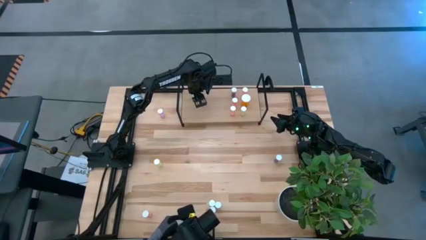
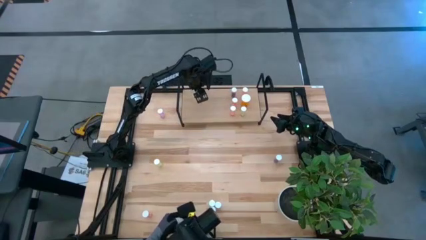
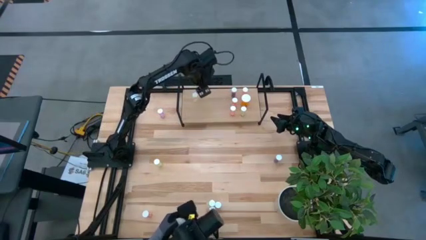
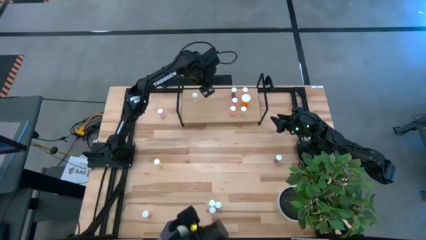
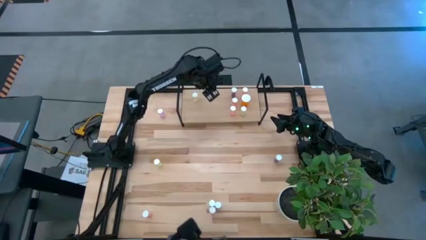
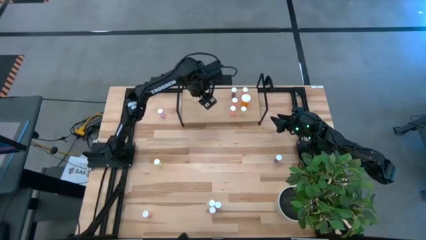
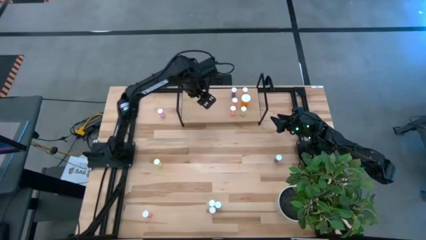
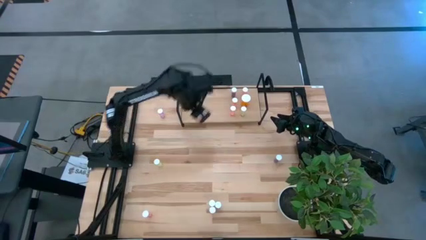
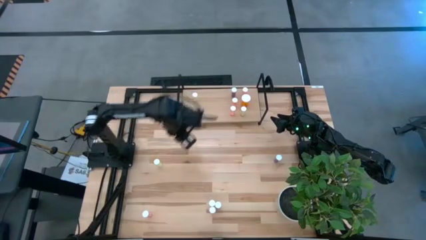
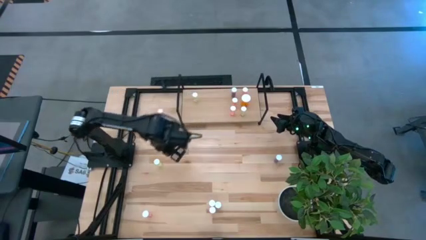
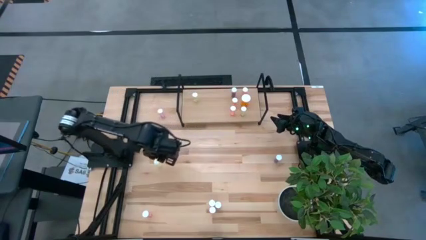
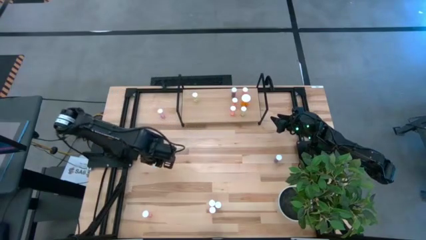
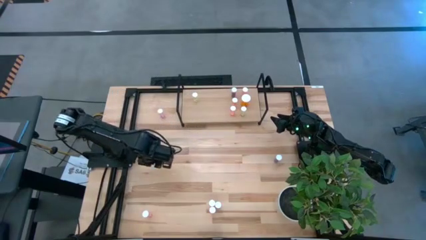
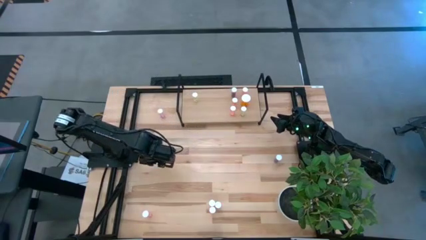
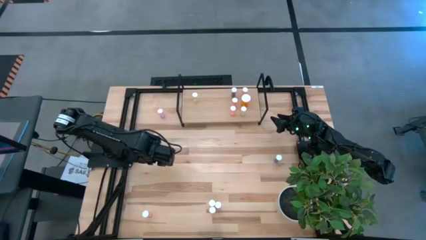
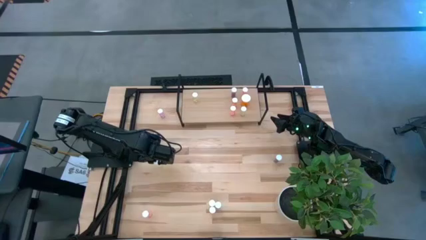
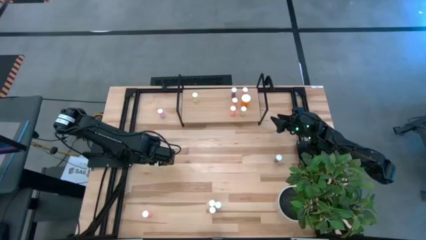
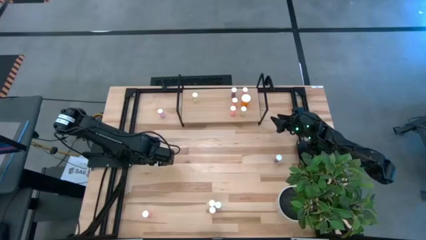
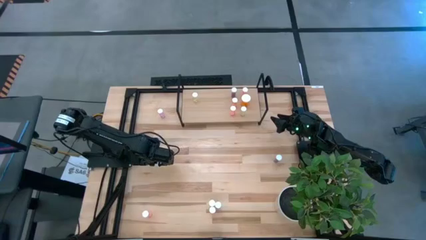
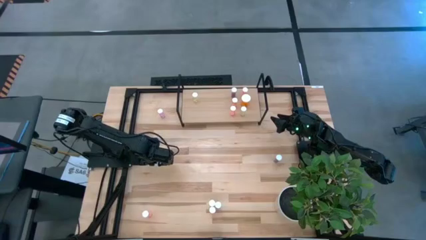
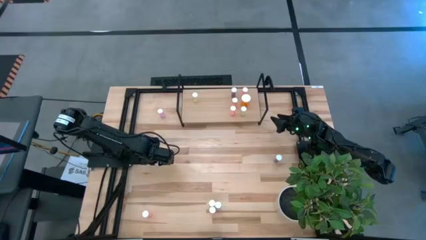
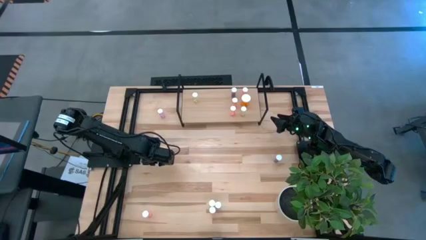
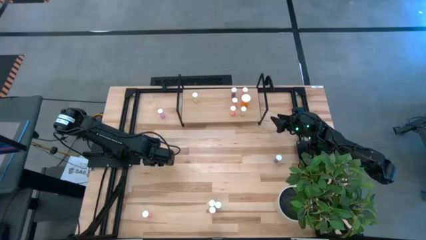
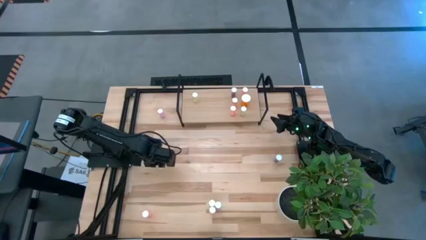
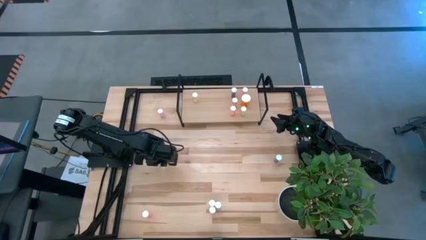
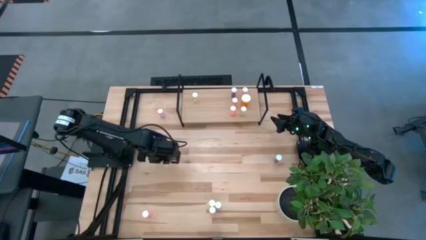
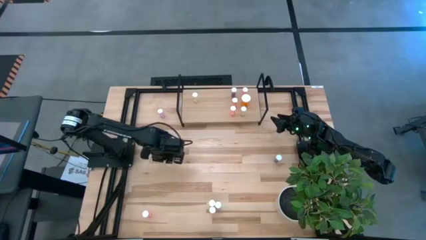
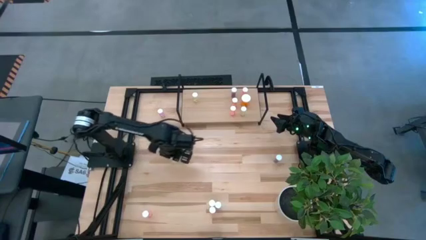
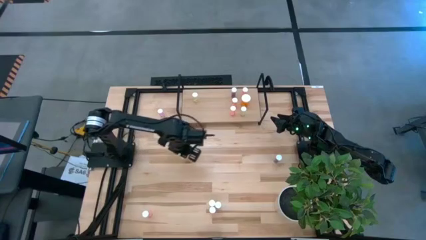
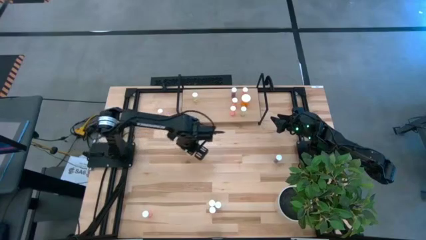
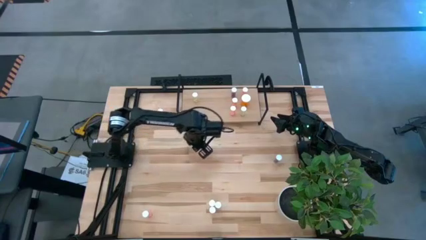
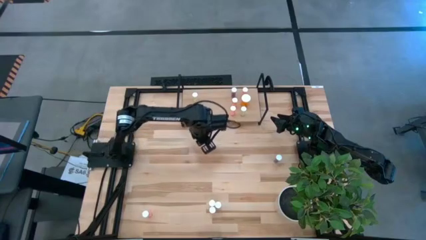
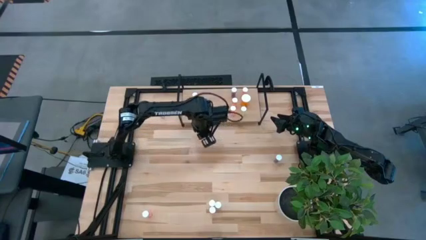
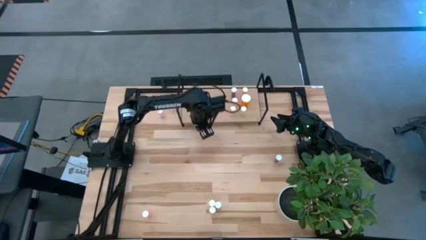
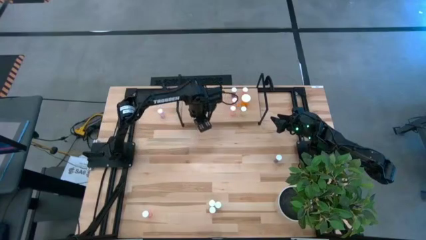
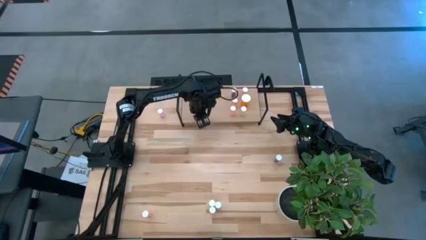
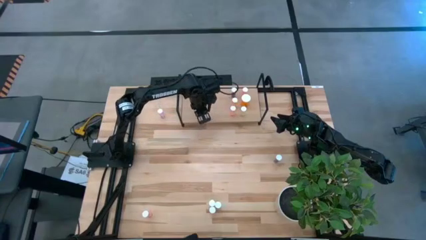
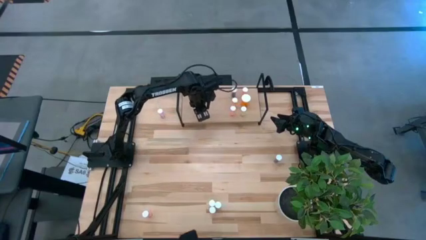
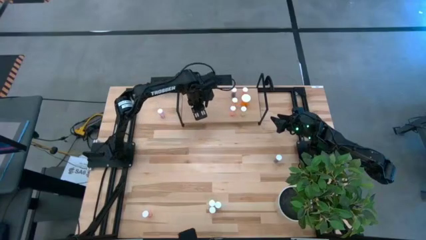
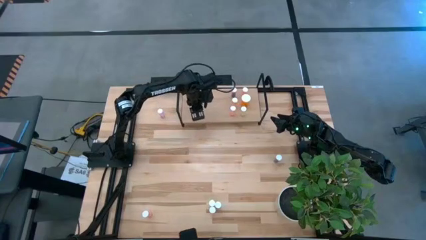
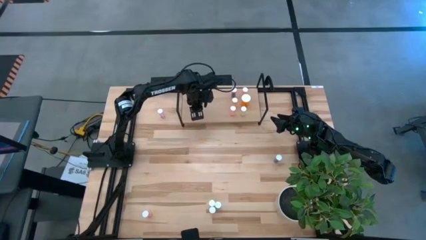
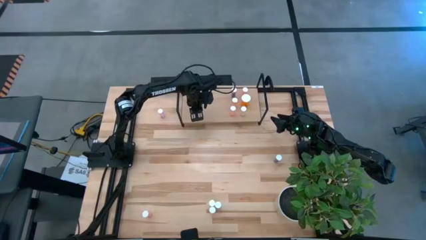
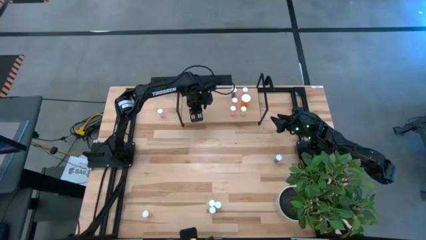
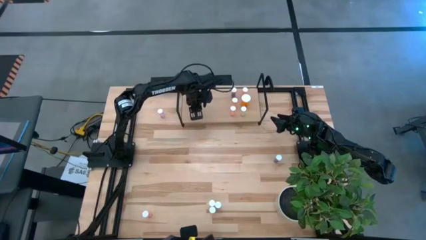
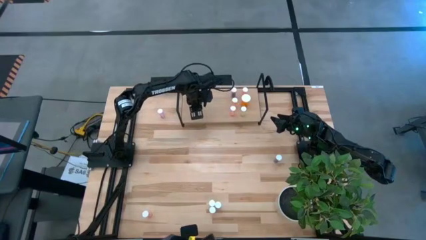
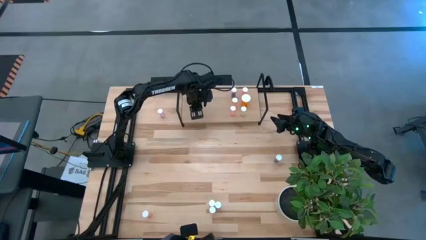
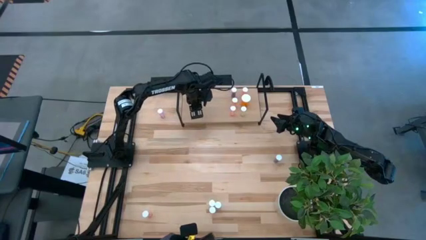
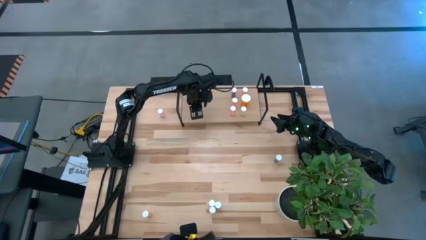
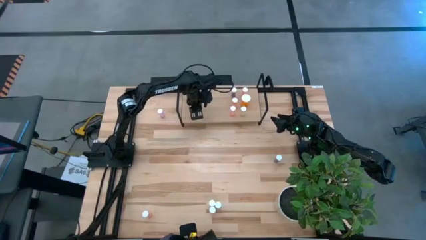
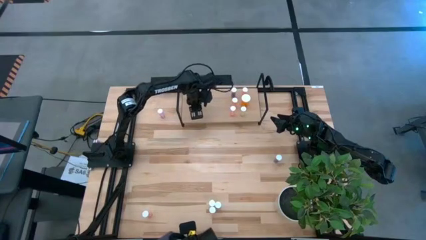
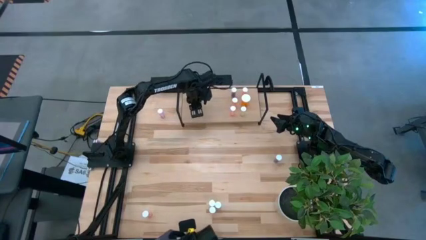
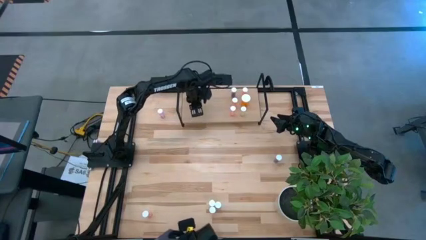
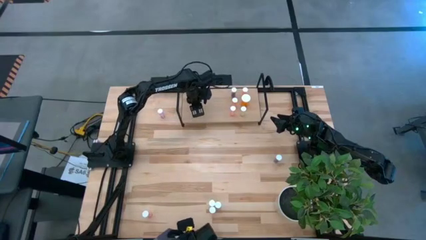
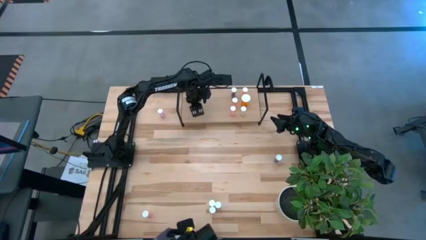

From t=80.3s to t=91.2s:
Task: Pick and place medicine bottles onto shelf by color
Put the yellow pill bottle on the shelf

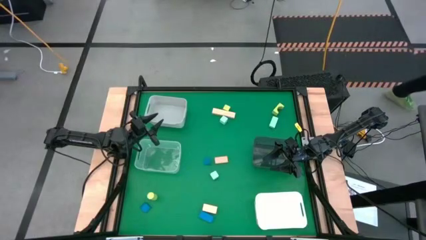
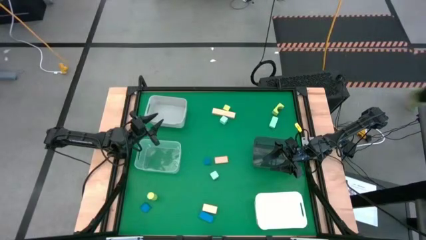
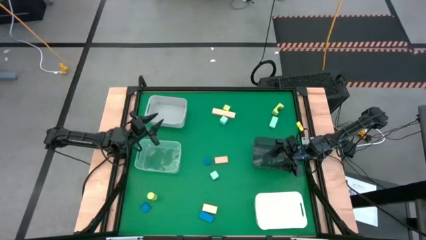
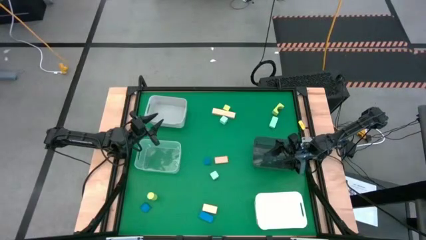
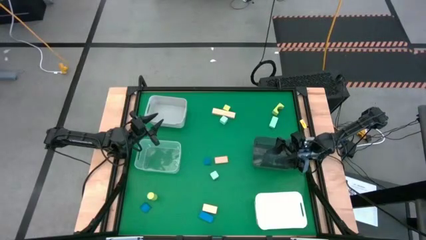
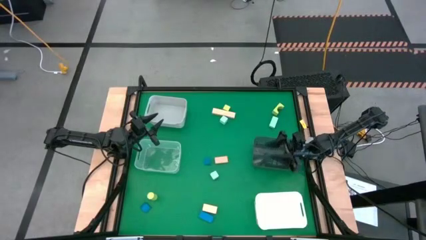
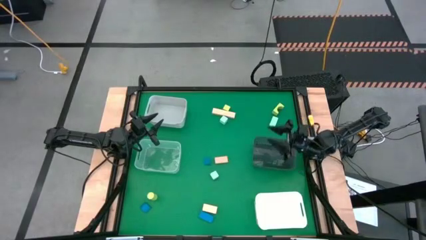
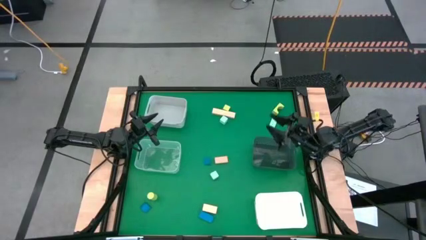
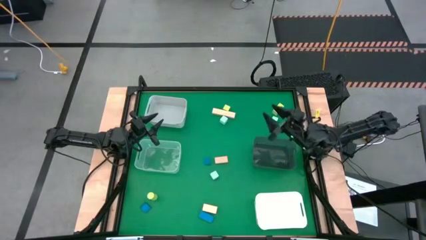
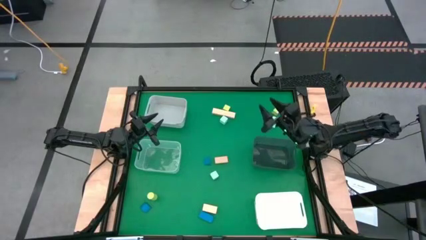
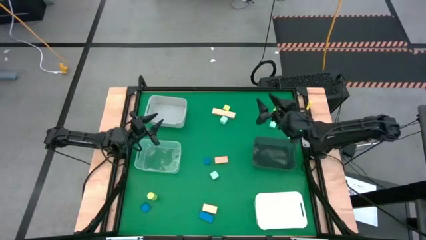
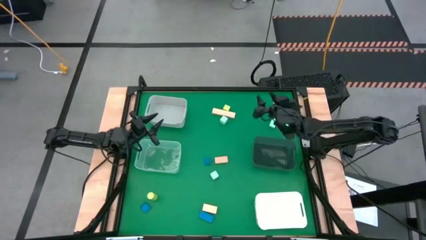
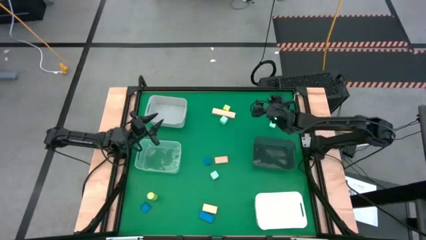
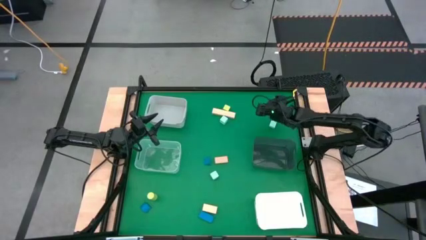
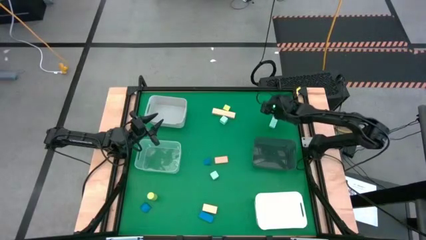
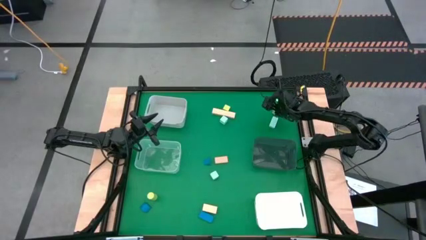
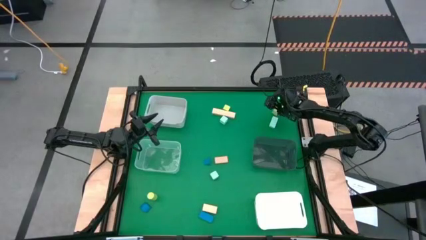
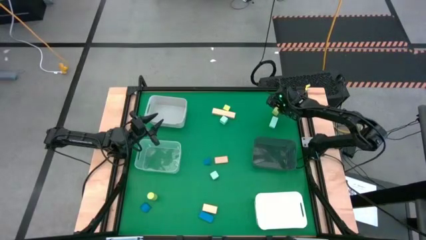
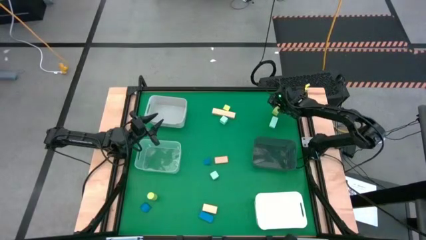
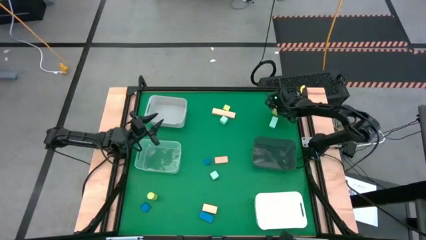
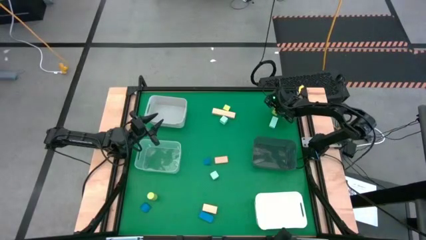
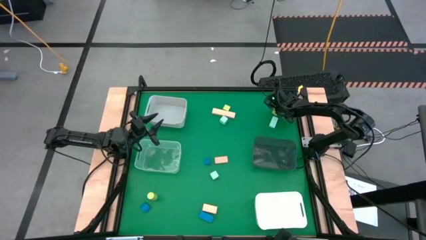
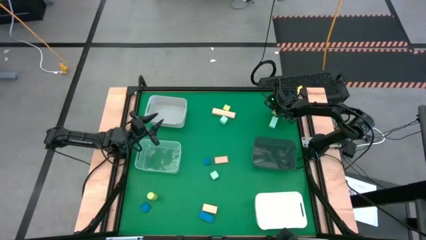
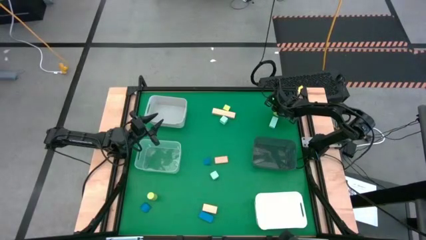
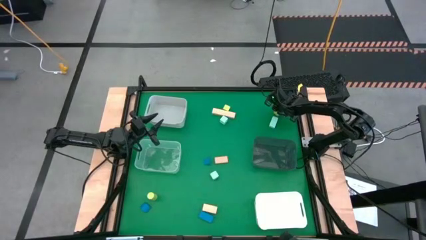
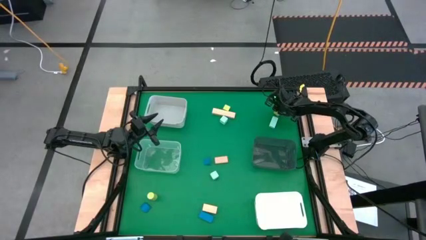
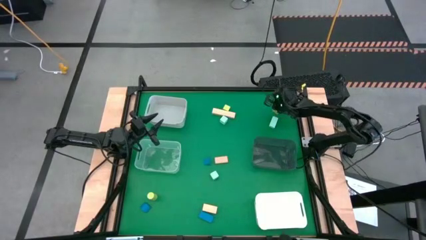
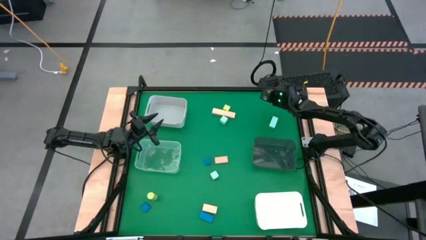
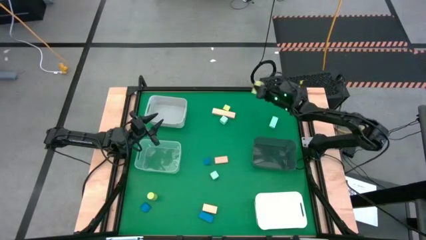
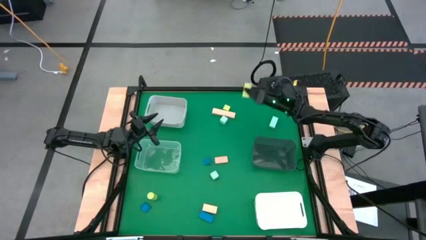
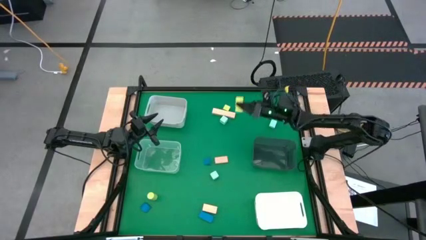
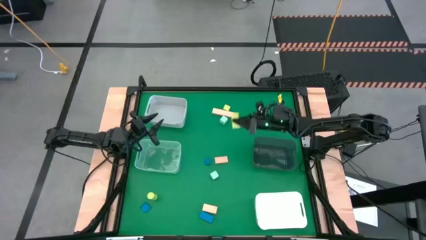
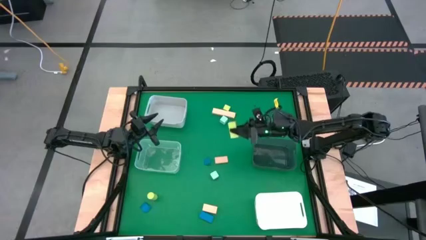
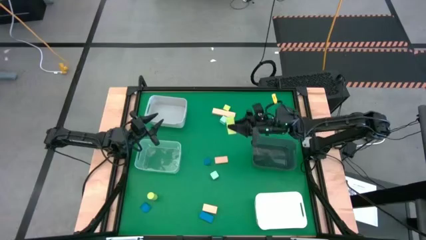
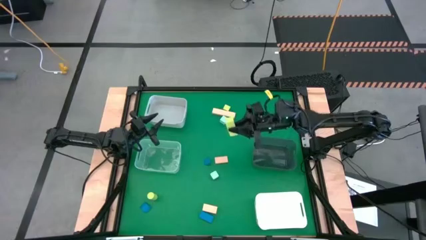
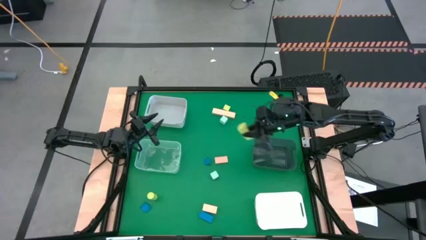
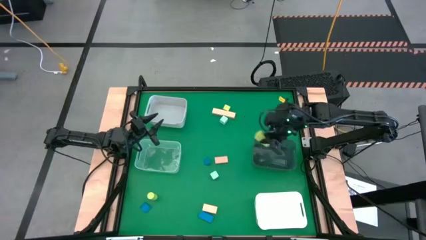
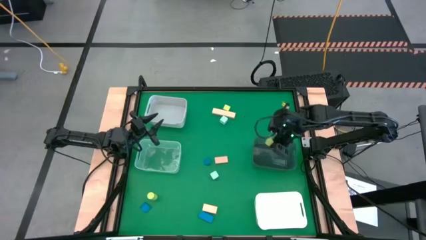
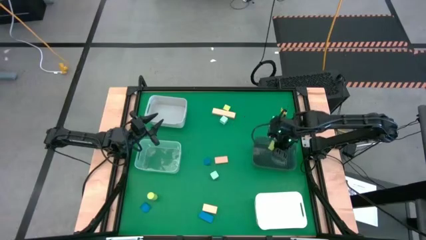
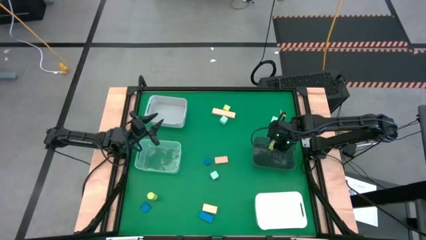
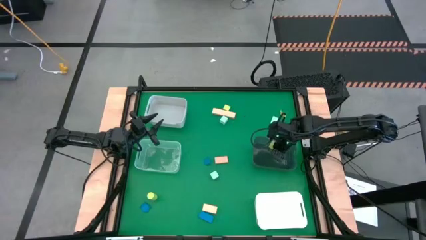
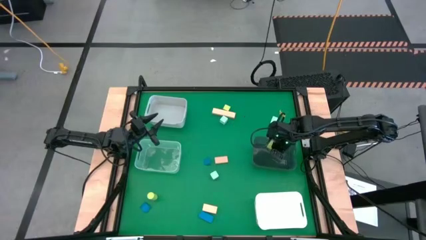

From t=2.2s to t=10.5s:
Task: Sort & place blocks by color
Put the top right green block into the black bin
